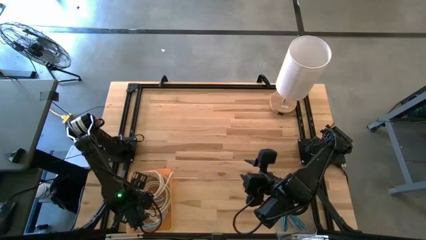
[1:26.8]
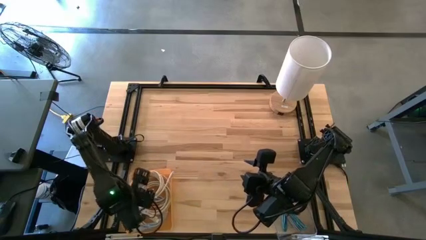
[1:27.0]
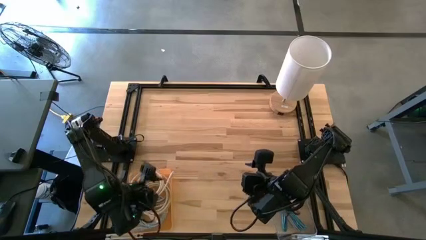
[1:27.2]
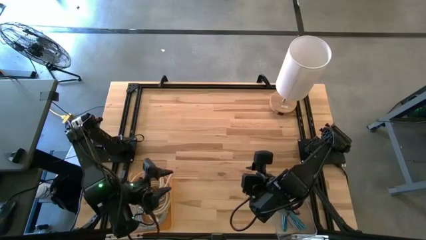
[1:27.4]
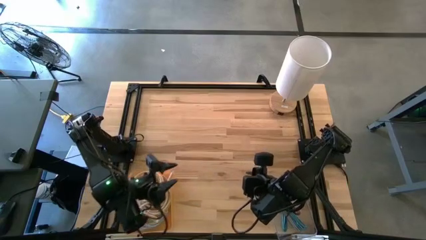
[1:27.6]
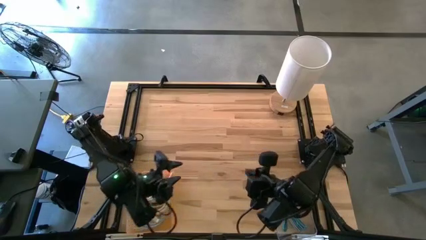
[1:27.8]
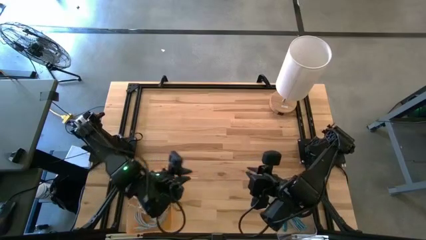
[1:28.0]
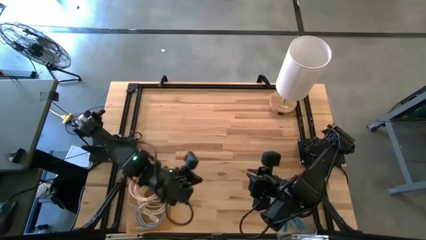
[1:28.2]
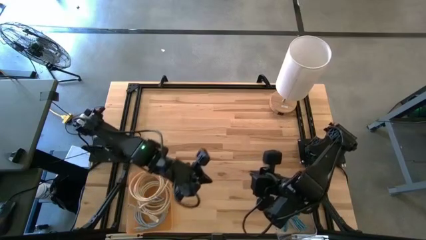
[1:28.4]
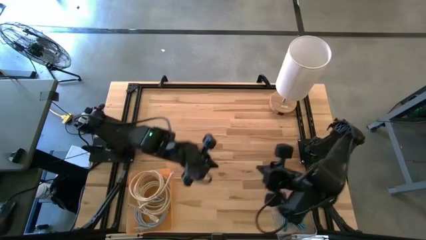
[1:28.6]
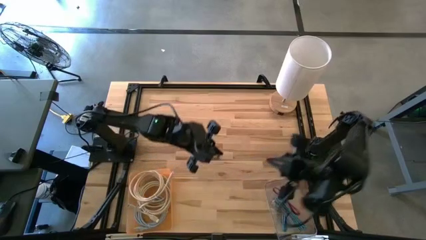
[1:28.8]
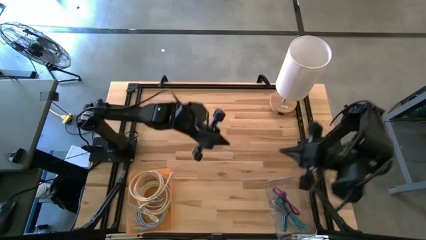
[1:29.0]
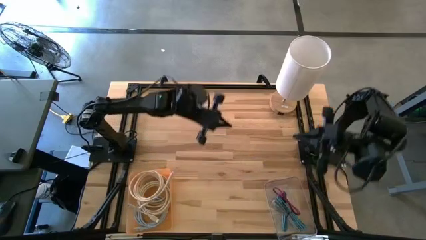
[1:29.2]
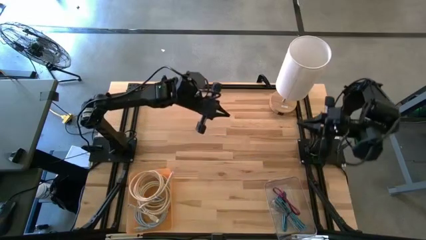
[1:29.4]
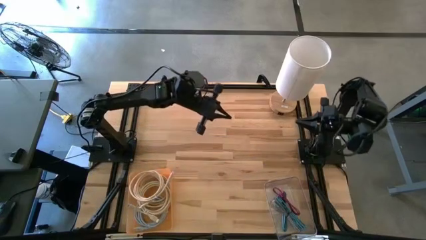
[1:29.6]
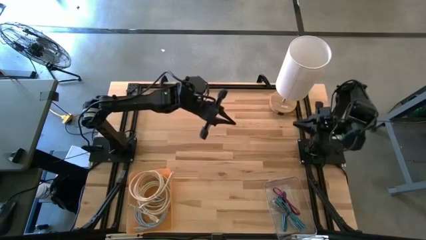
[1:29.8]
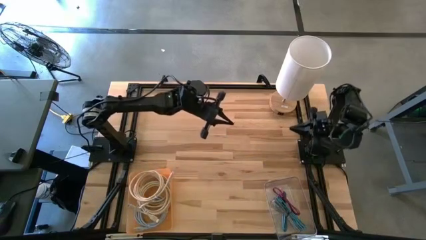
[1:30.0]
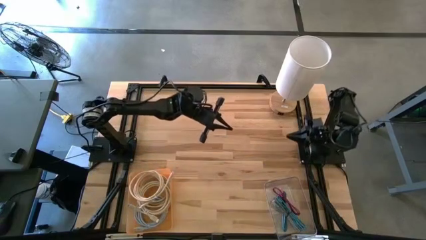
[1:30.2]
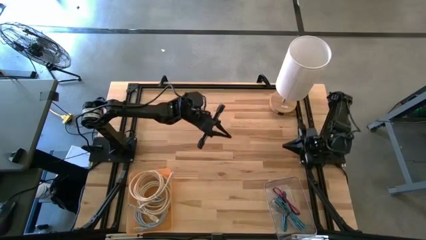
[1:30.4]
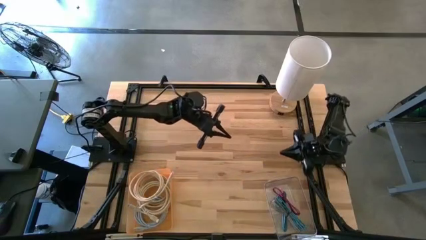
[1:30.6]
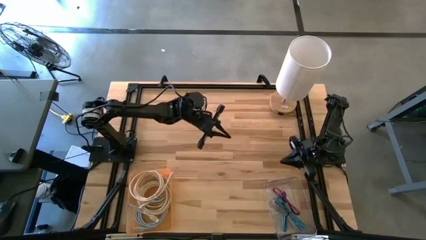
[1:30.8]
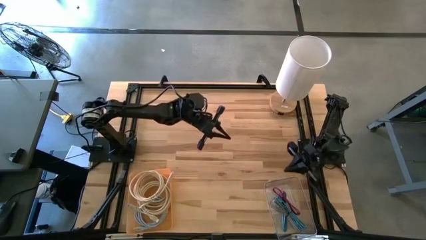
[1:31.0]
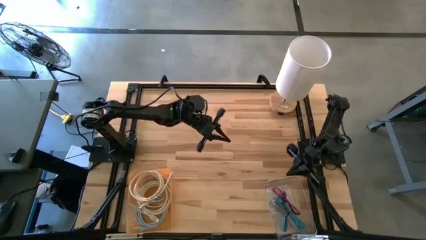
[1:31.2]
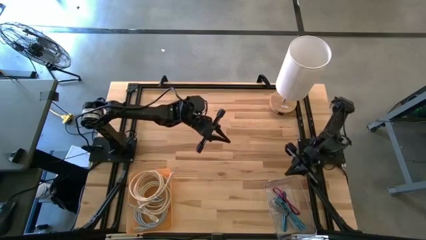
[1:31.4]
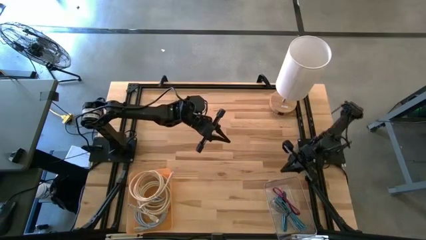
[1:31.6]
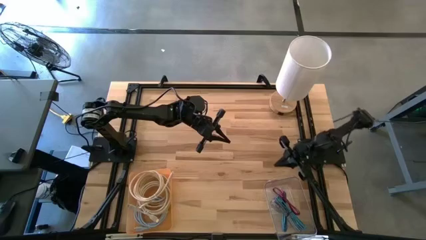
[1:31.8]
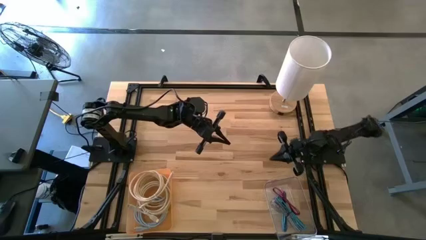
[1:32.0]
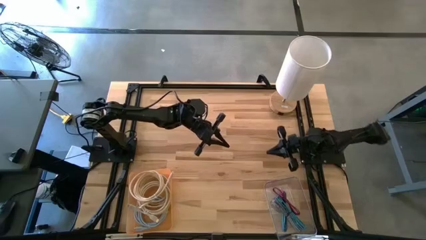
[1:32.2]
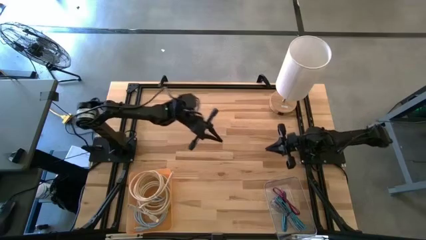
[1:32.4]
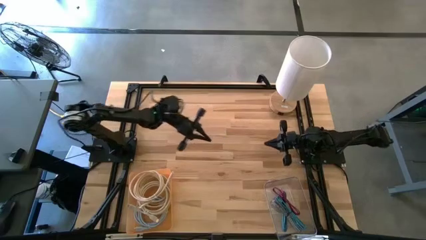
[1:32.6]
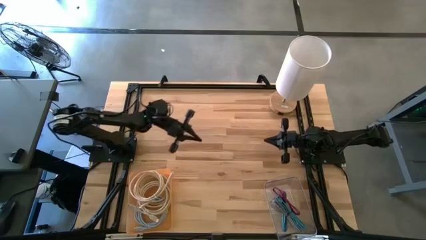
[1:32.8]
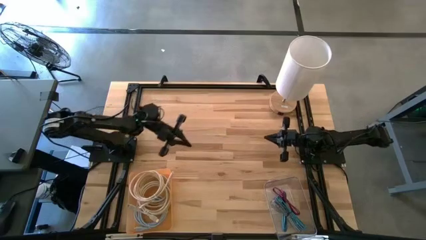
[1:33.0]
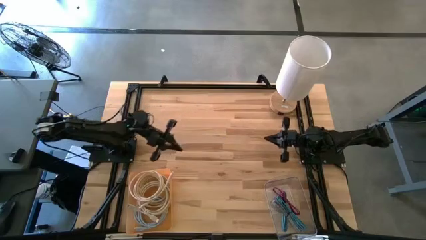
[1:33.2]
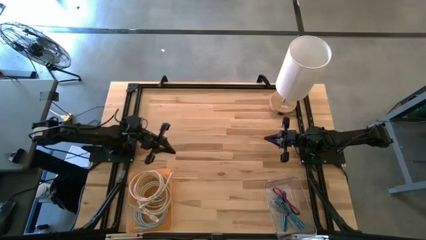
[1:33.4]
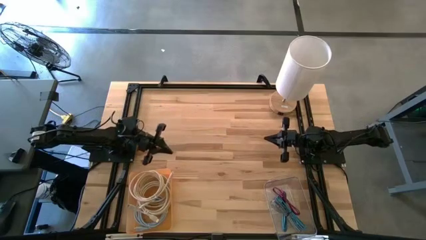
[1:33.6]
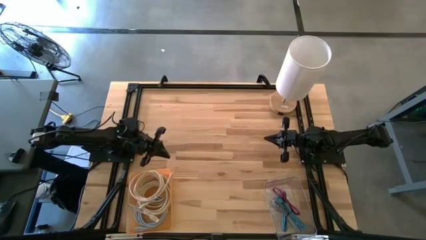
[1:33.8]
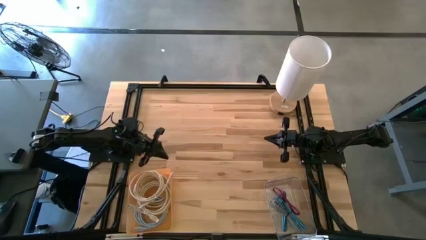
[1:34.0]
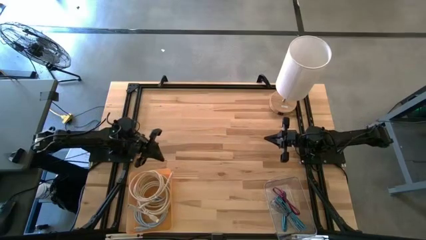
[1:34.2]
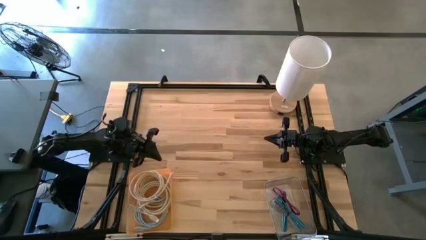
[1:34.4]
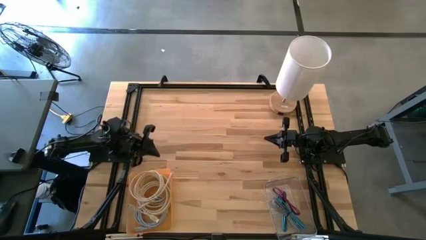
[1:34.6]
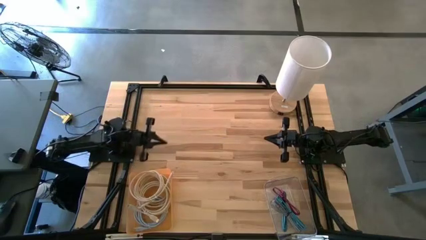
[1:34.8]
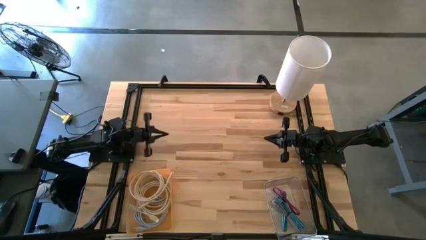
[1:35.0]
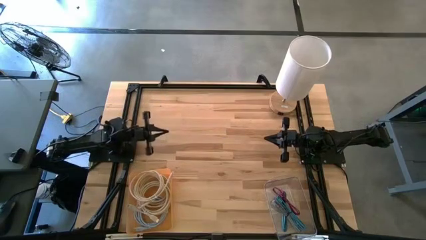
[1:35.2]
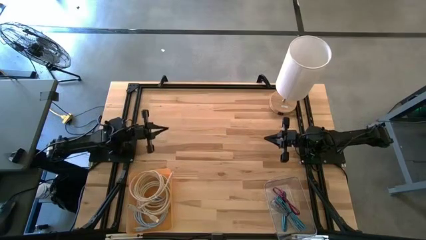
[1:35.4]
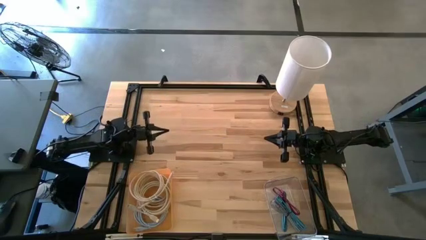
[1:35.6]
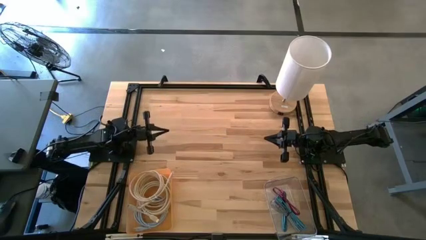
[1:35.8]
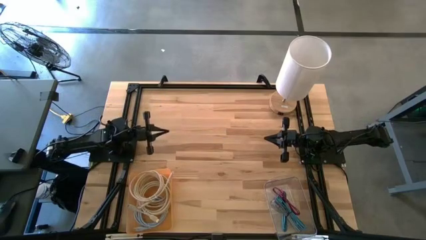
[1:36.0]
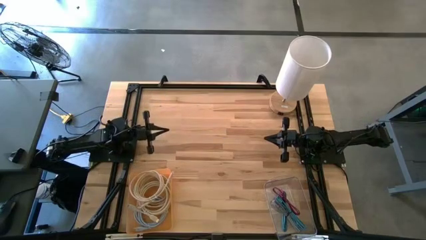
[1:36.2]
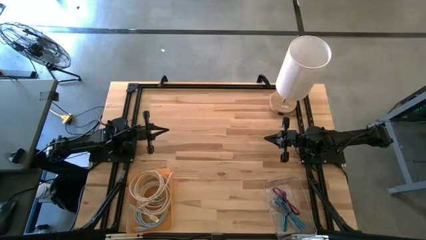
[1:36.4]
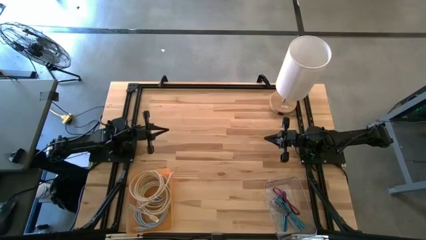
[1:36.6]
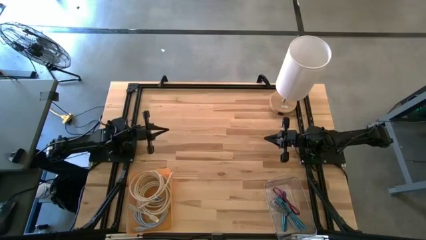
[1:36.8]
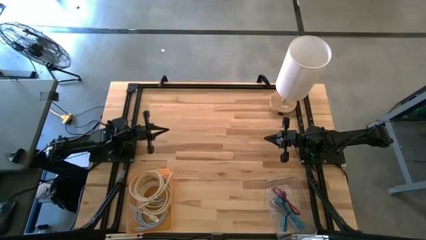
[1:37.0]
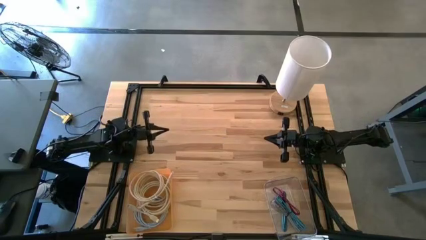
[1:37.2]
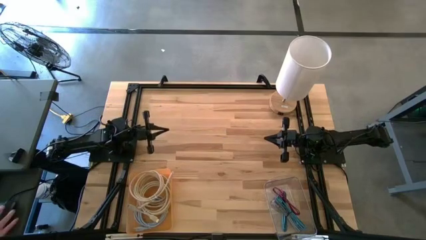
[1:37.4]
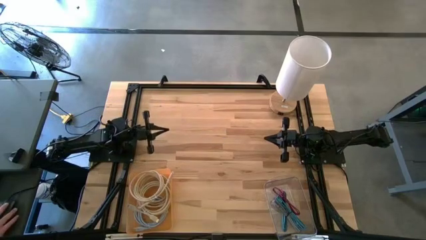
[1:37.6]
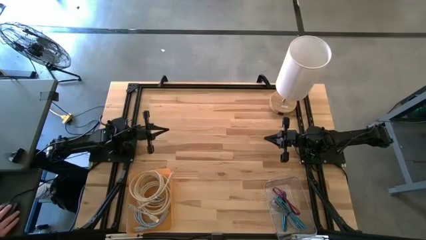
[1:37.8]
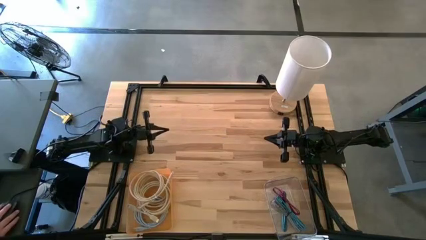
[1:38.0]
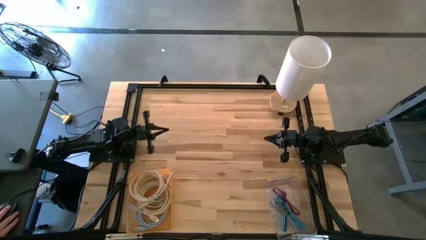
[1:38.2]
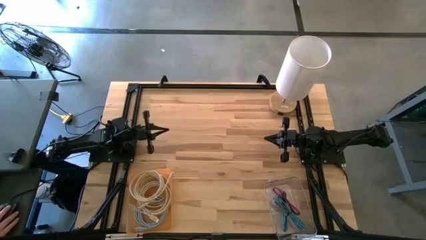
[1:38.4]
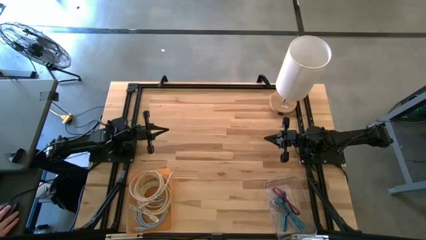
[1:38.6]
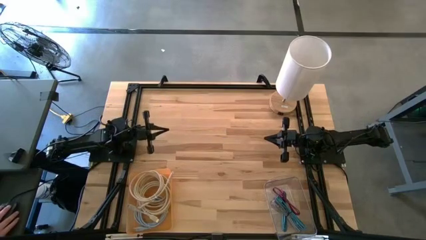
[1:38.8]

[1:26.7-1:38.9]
Task: Pick & Place USB Port
Return to Home Position

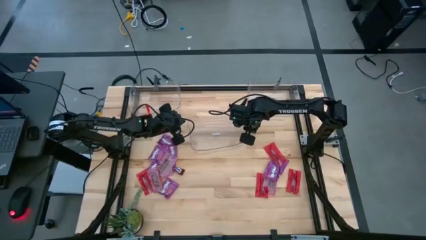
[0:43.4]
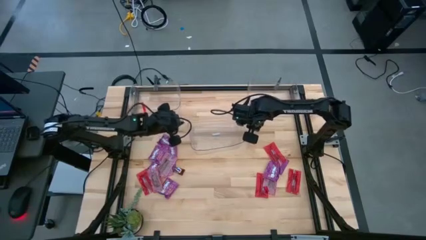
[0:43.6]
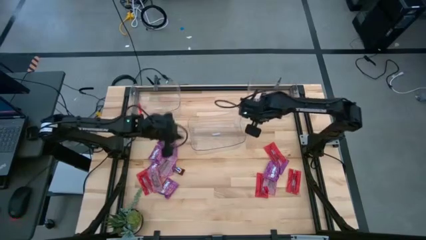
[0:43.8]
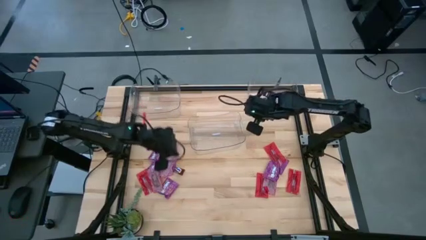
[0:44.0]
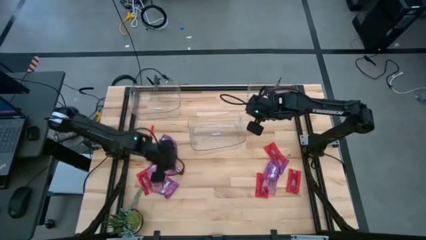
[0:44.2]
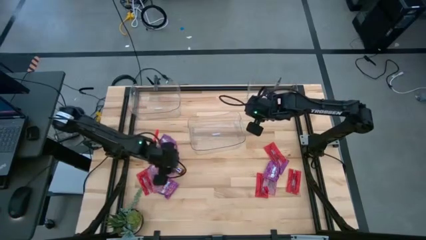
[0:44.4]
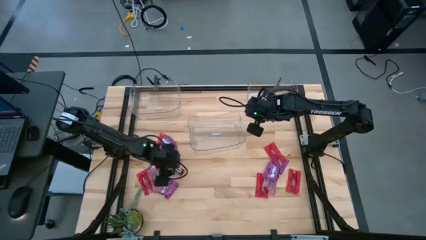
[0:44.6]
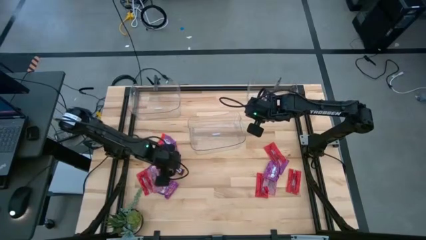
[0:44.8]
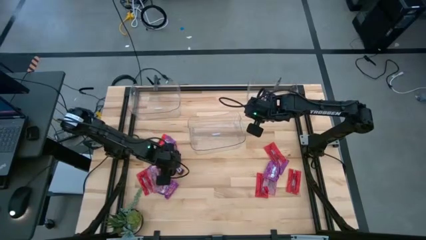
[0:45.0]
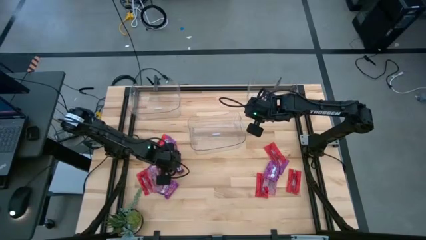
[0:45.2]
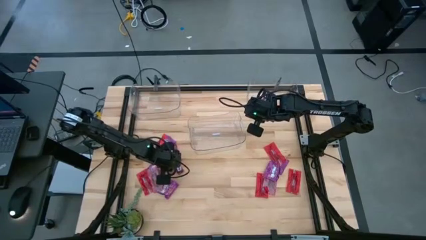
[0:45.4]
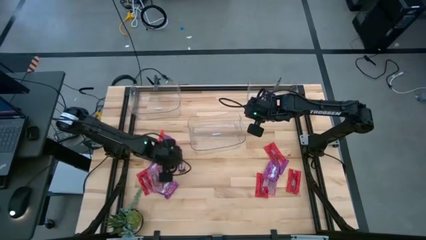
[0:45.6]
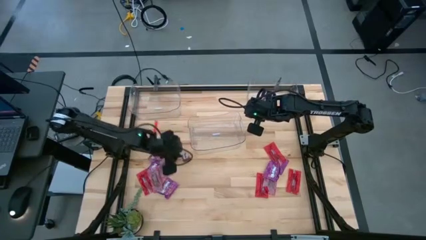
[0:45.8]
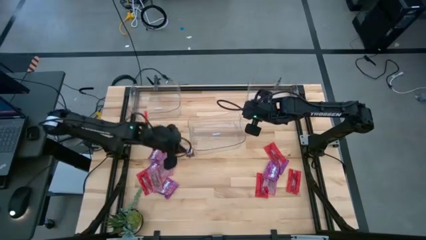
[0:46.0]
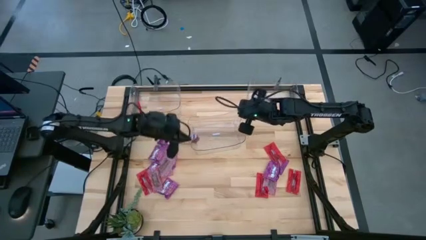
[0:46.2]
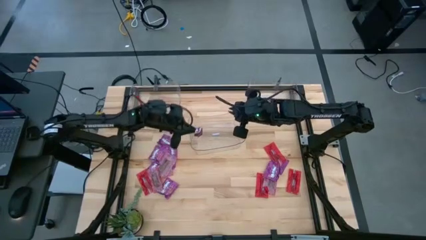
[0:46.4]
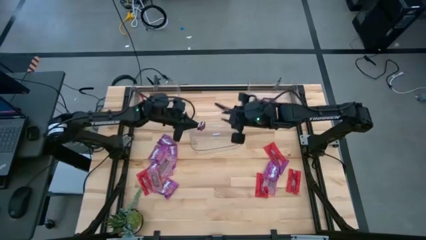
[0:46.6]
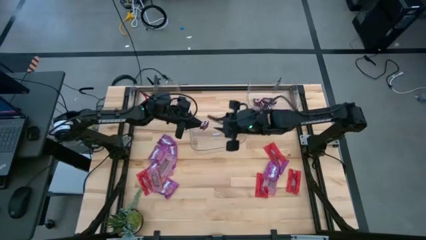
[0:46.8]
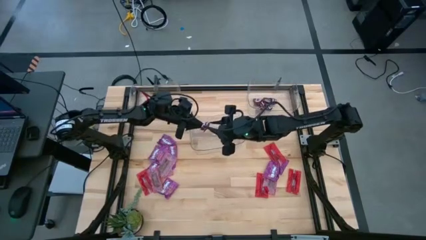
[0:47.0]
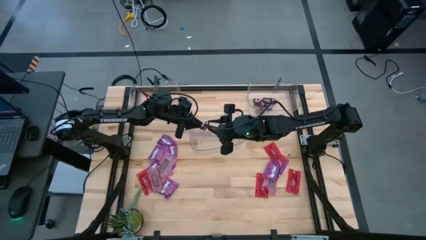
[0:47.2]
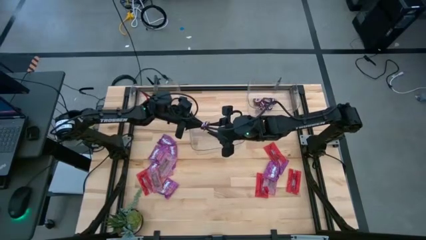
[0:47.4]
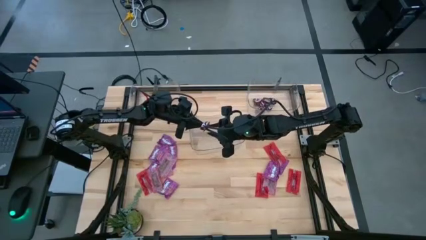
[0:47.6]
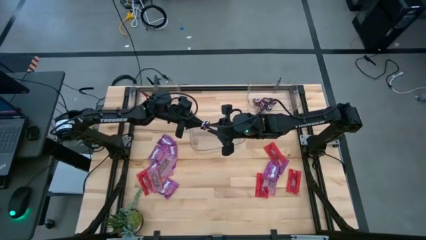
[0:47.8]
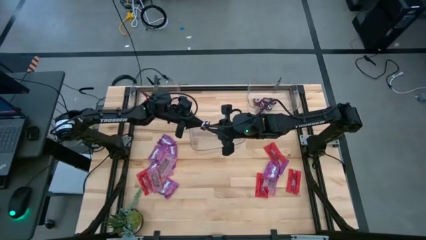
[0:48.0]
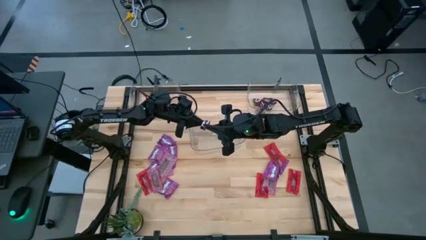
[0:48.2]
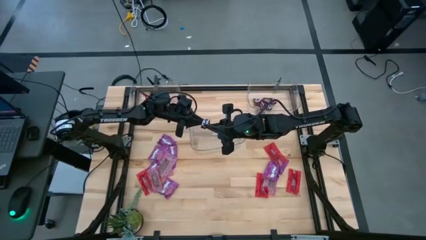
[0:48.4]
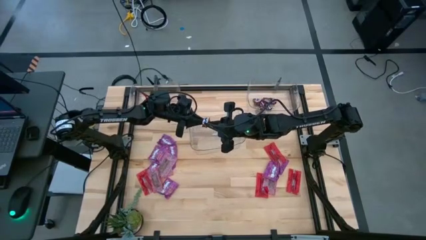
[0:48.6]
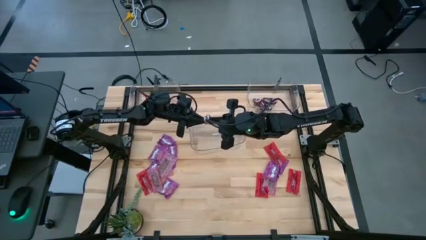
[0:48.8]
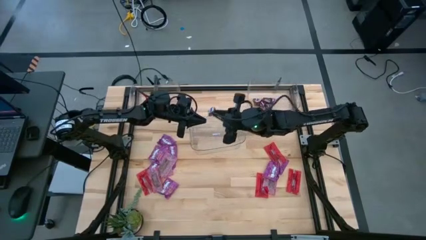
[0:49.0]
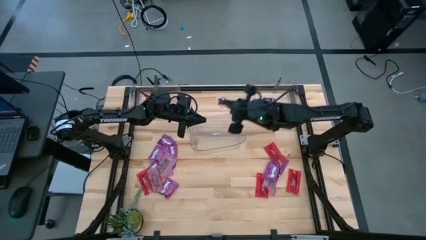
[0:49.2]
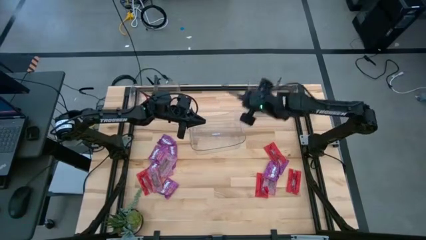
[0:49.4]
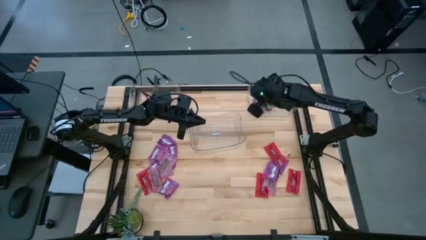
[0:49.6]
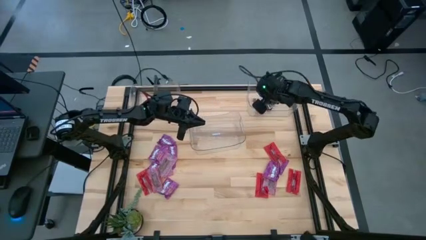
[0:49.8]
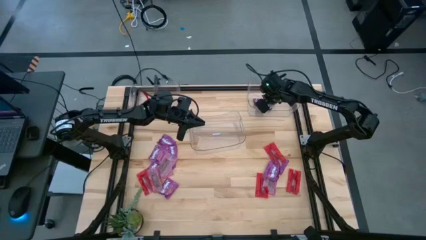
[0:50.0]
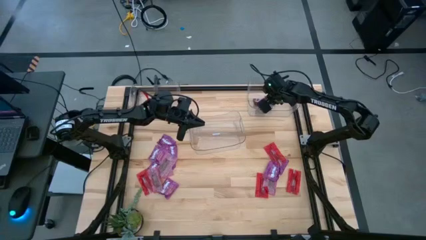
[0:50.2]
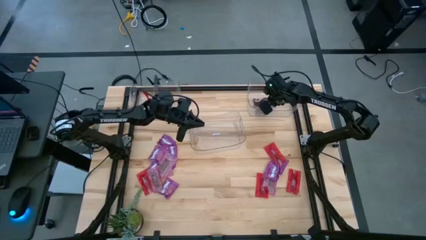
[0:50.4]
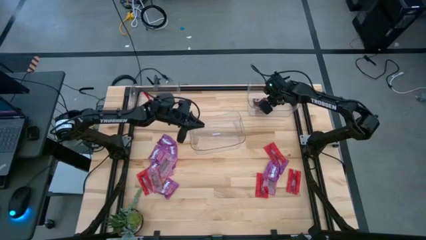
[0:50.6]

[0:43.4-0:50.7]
Task: Sort candy
Put the brown chocolate bar into the top right transparent bin
